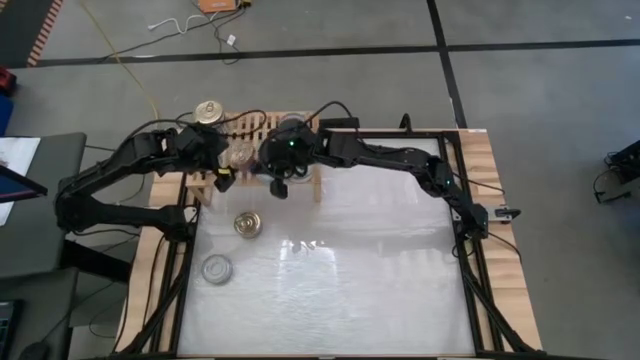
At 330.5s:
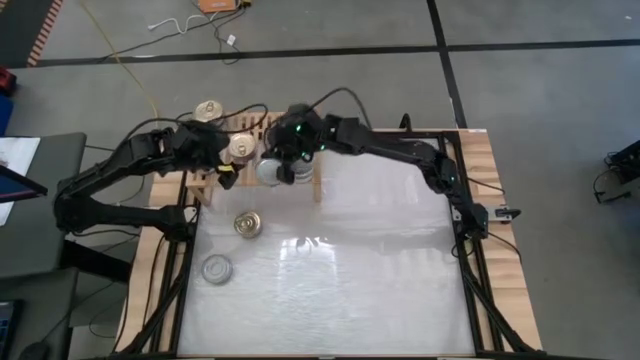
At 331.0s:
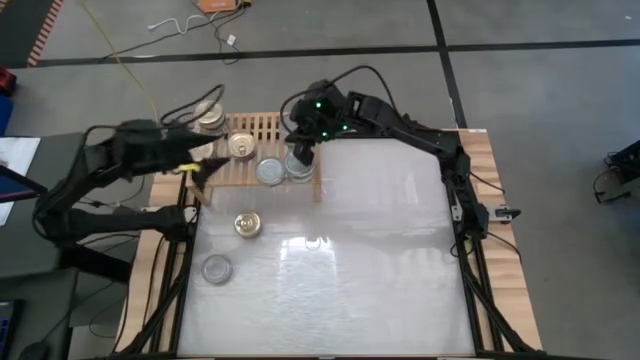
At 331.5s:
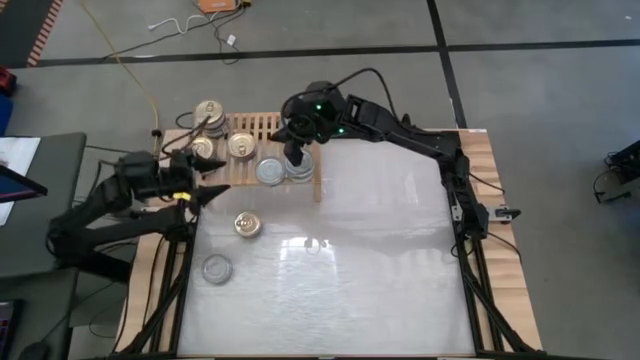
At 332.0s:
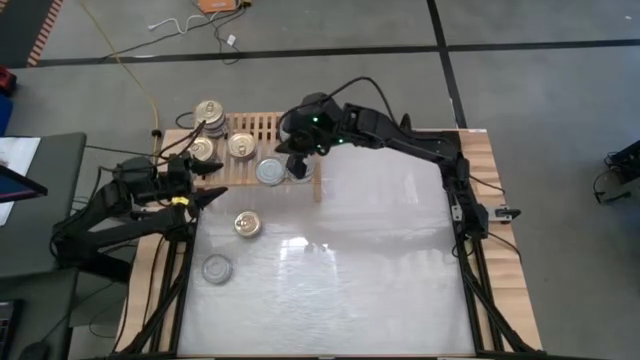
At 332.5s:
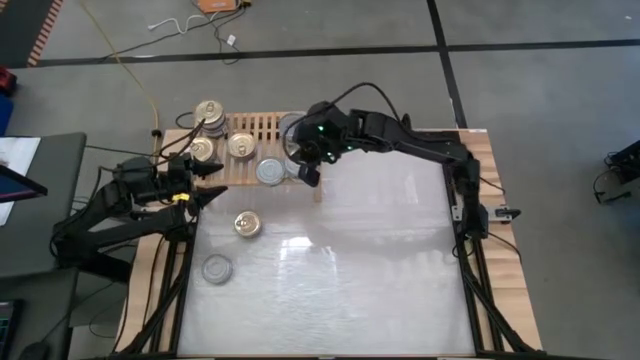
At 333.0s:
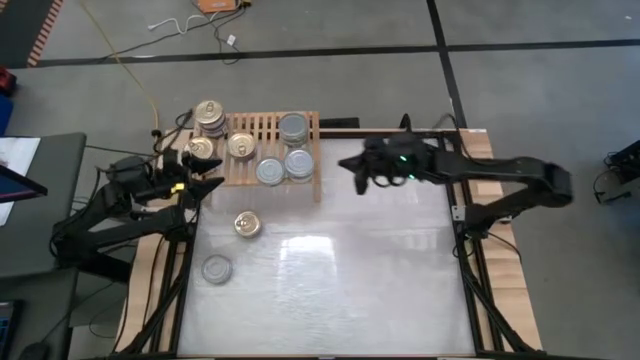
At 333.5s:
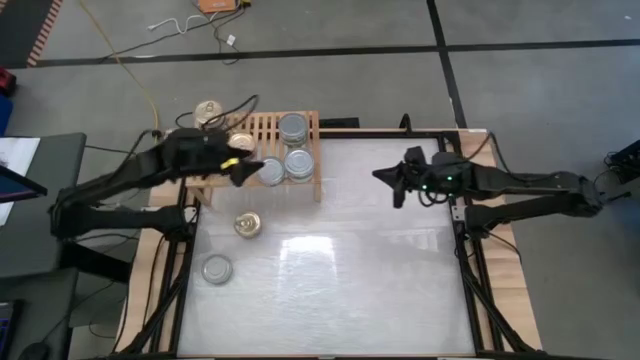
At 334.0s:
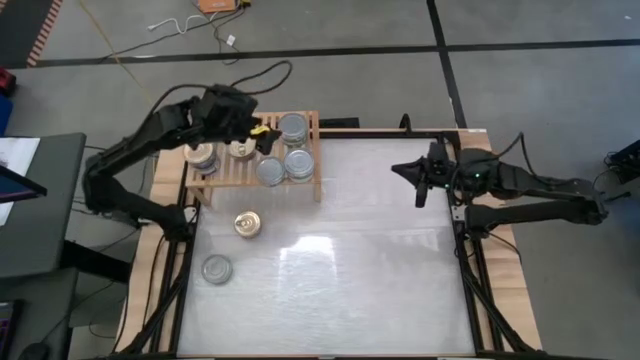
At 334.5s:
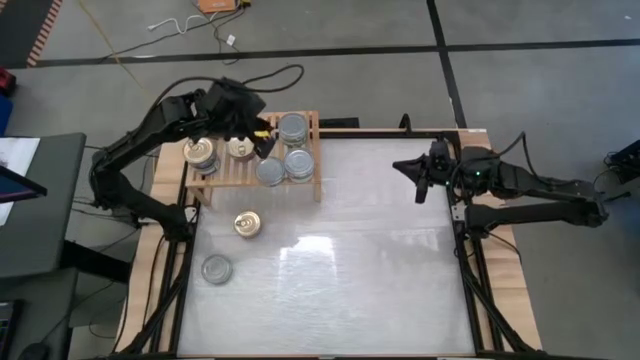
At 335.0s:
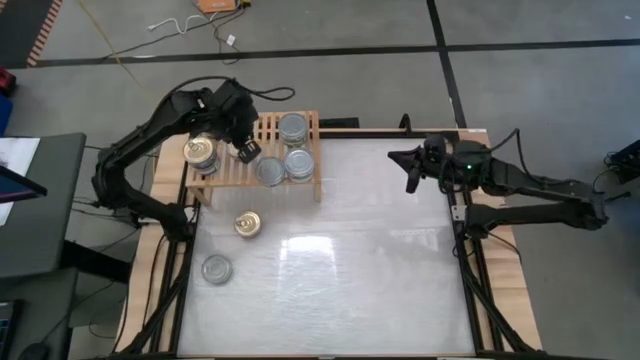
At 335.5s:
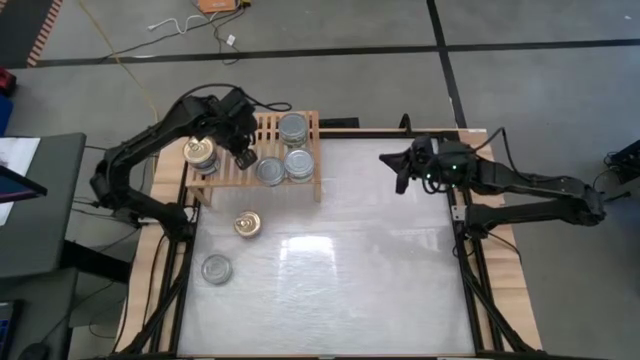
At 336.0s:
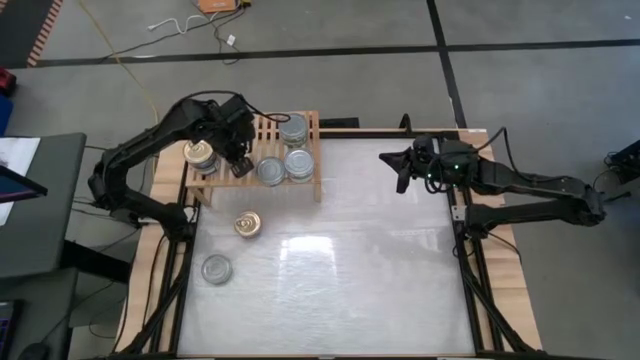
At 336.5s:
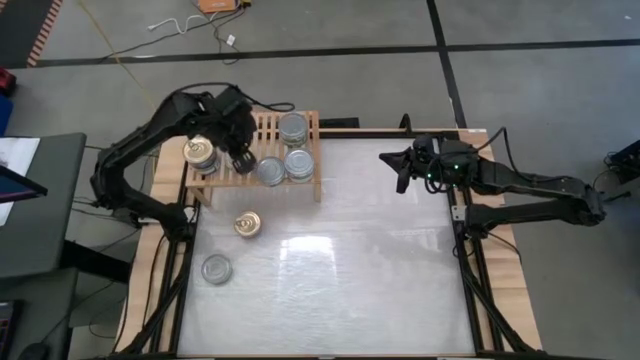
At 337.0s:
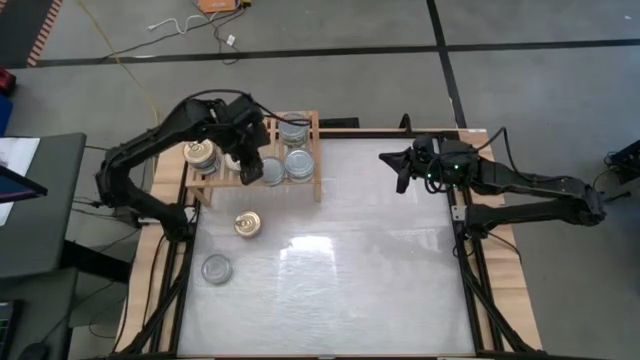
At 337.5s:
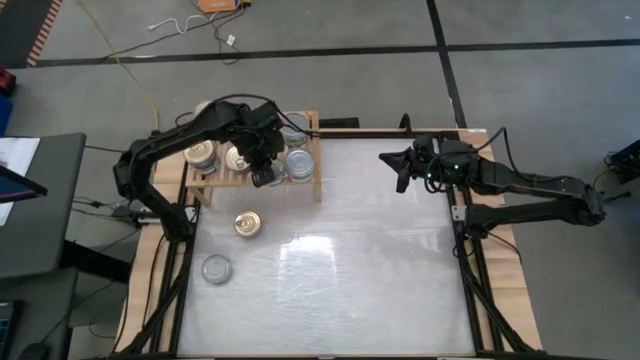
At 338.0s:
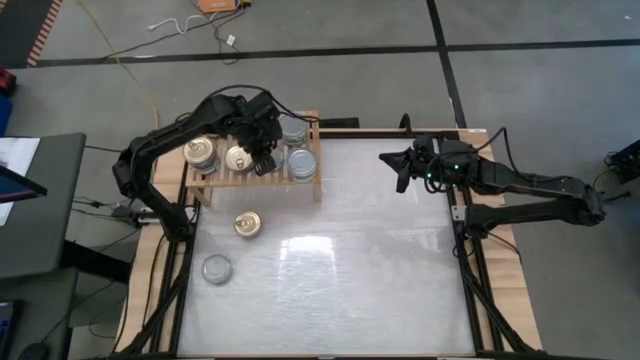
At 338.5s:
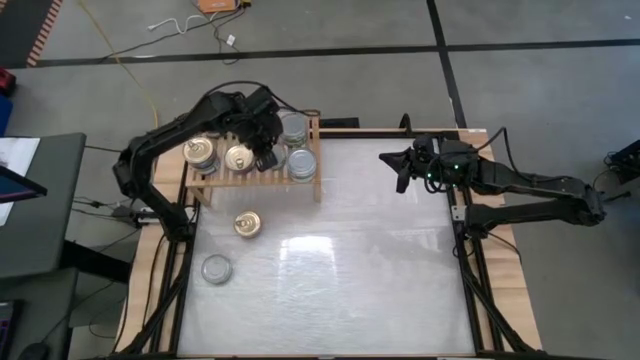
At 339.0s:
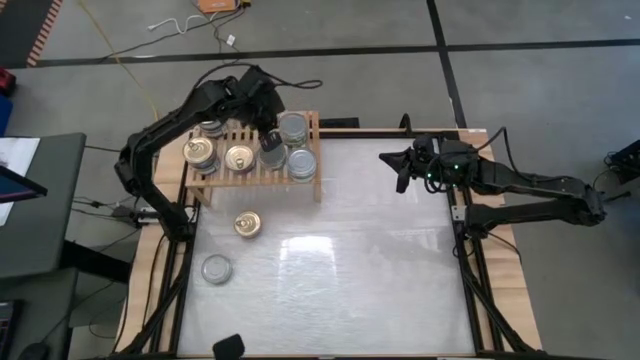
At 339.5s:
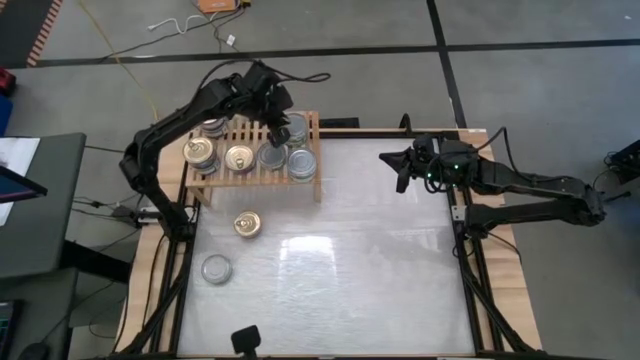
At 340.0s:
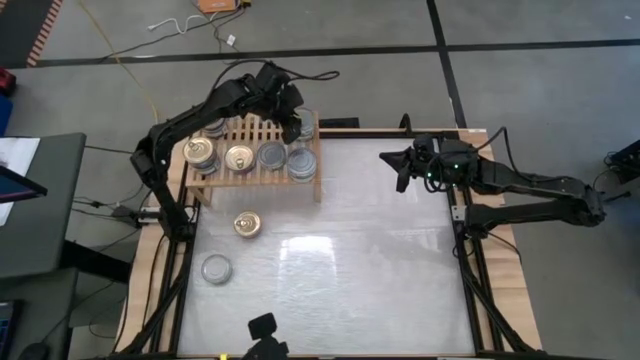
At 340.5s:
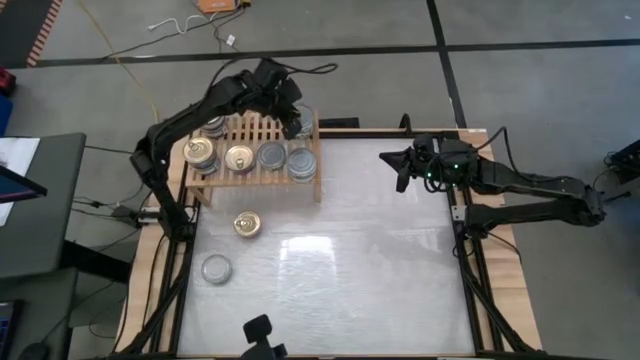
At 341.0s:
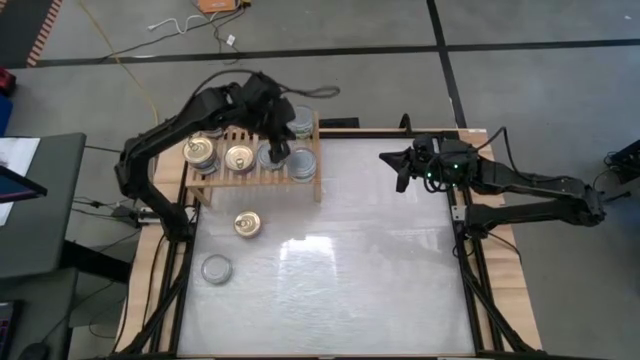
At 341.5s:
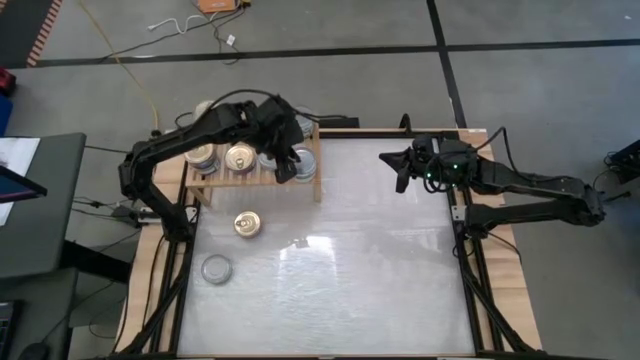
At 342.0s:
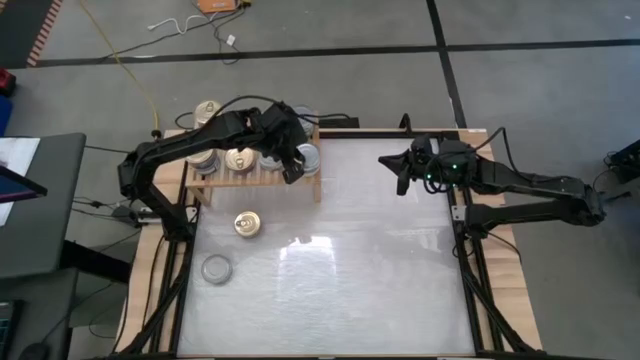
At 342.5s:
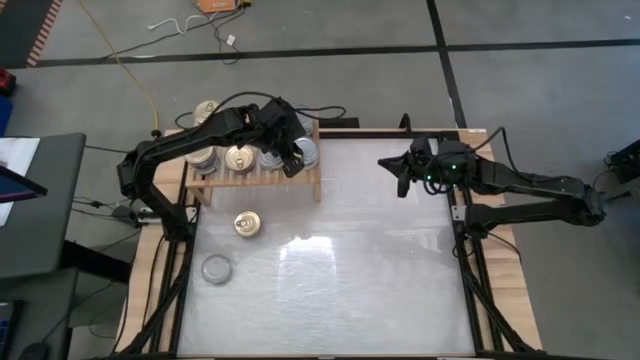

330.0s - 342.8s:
Task: Stack canned seafood by type on shelf
Adjust the tuna cans on the shelf

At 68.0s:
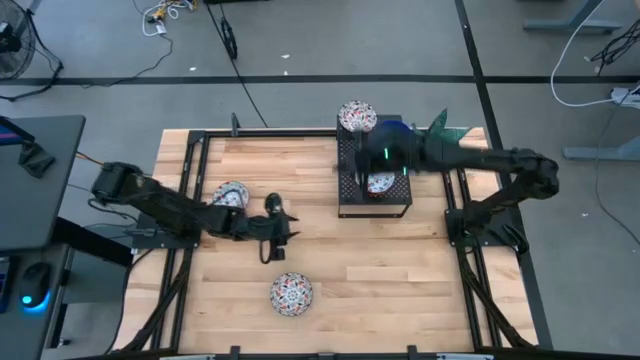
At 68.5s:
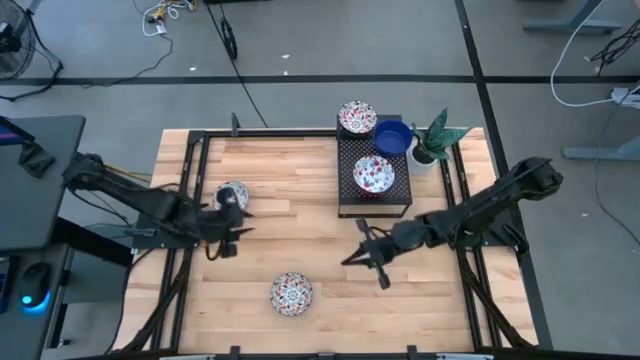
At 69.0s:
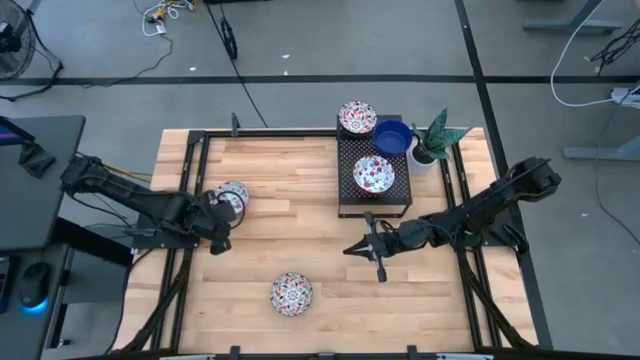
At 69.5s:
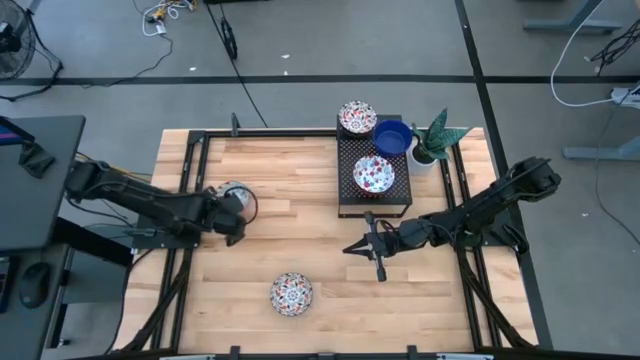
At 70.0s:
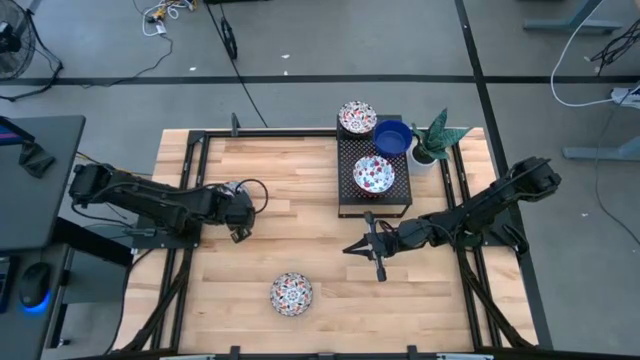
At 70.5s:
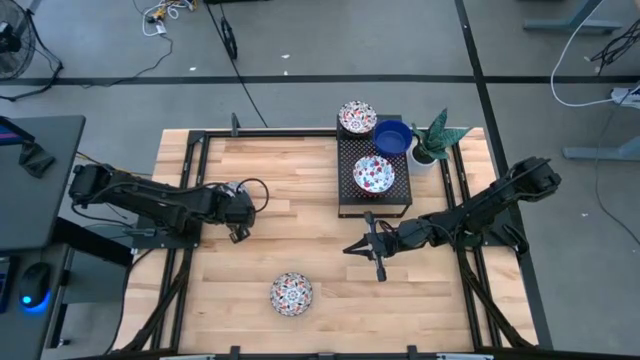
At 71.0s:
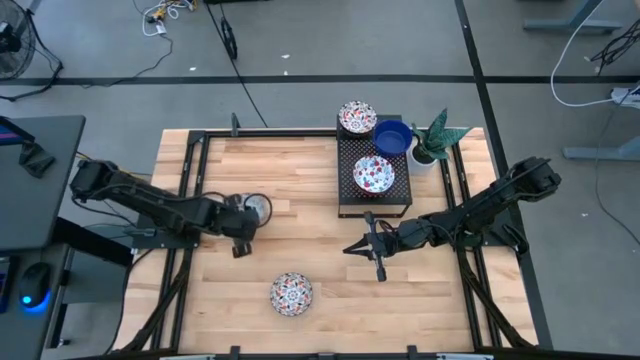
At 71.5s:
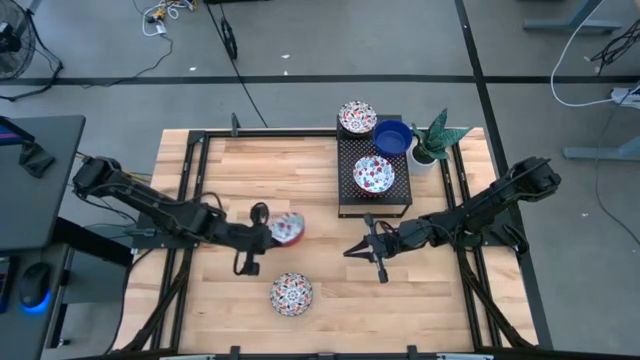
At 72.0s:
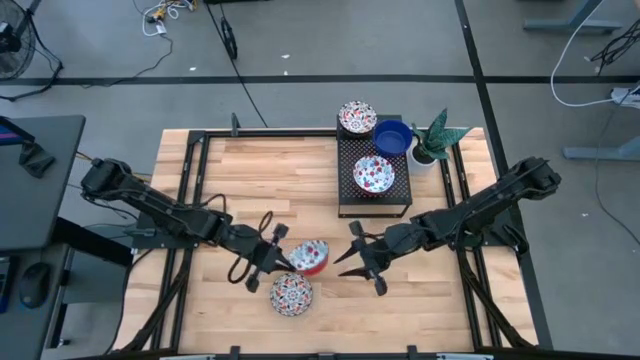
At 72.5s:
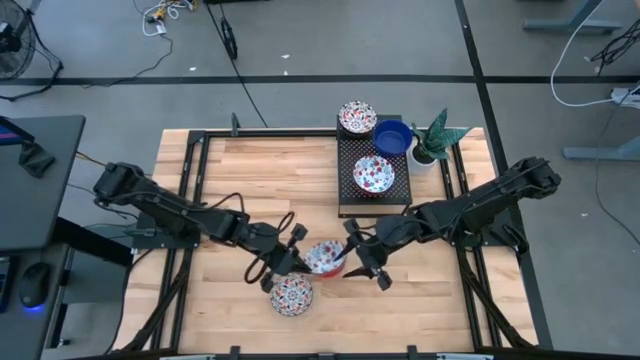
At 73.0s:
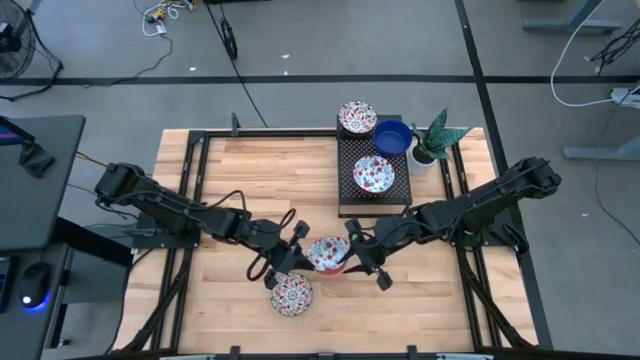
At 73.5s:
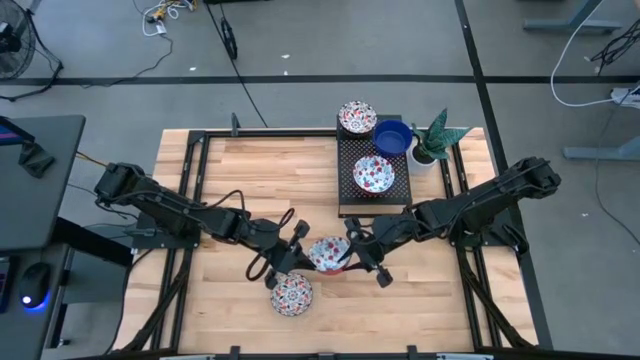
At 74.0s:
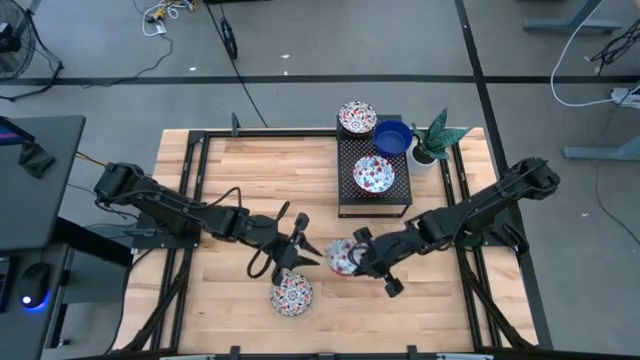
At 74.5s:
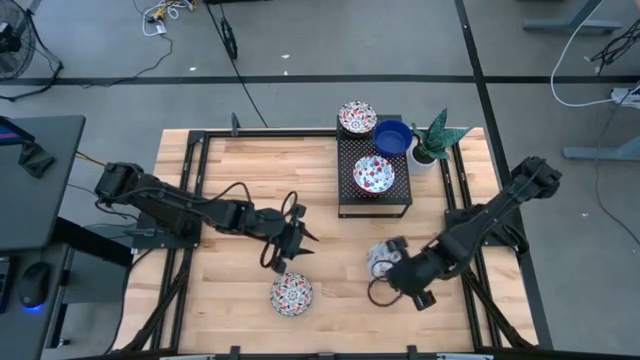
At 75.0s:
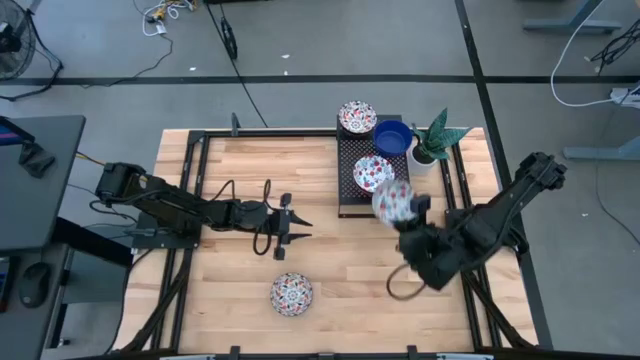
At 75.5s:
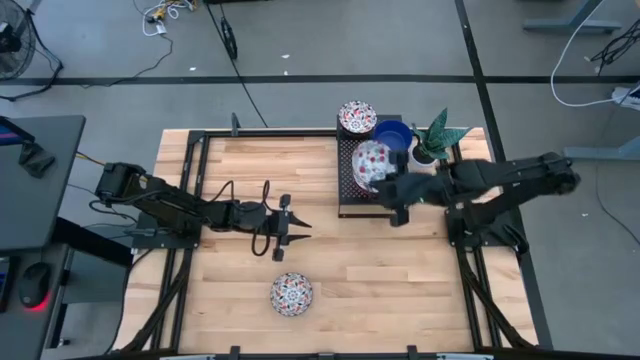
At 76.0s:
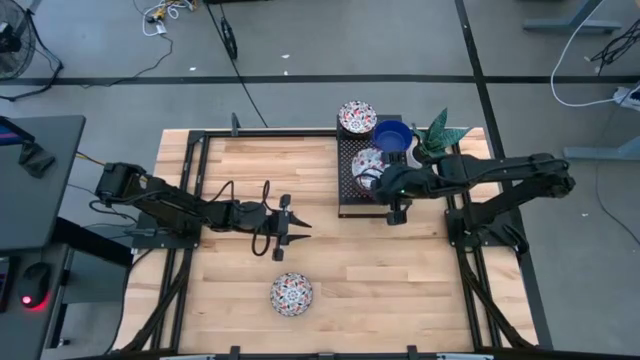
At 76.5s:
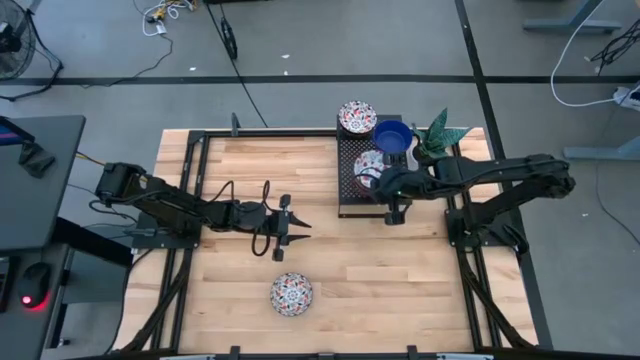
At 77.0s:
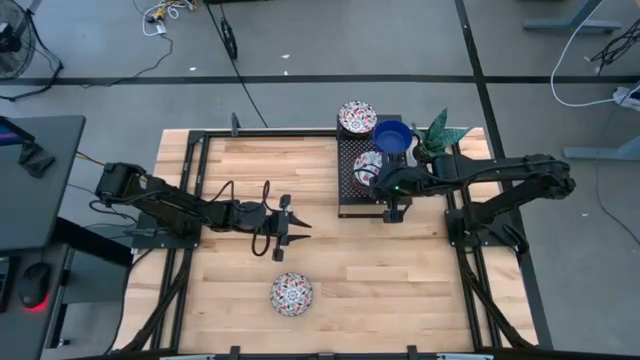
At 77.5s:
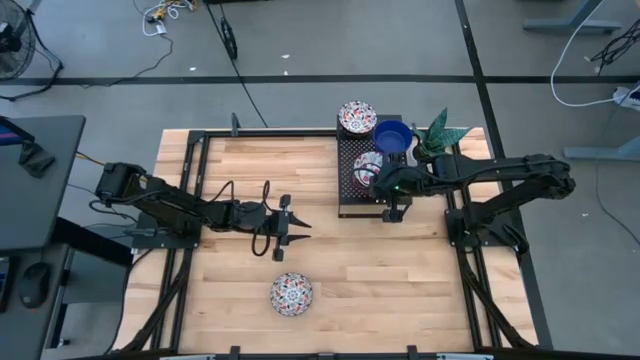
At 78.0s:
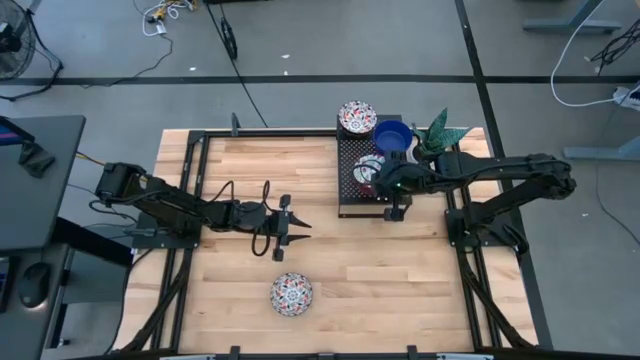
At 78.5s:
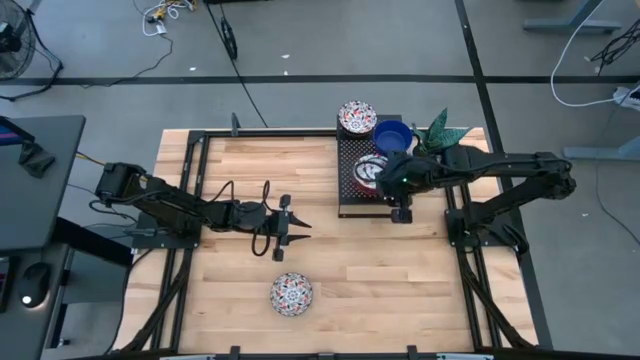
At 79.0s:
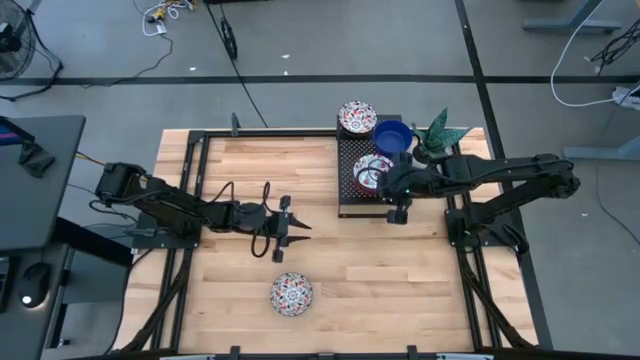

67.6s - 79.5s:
Task: Pick & Place Mini bowls
Stack the red patterned bowl on top of the other red patterned bowl on the shelf
